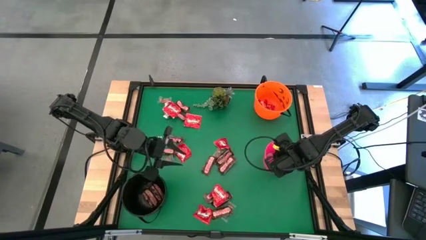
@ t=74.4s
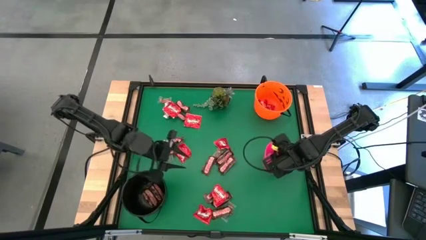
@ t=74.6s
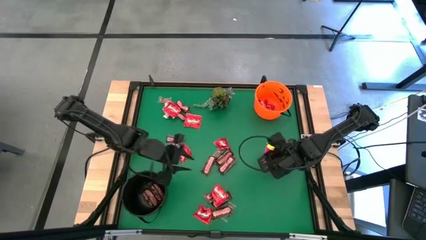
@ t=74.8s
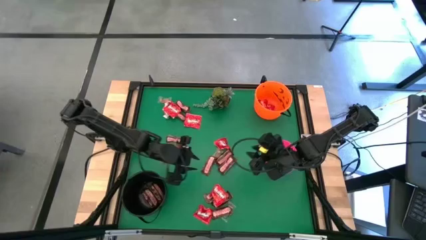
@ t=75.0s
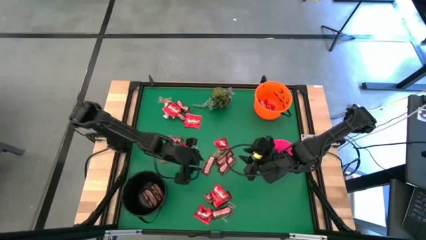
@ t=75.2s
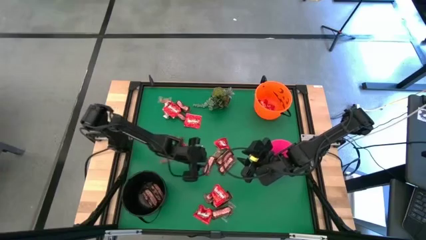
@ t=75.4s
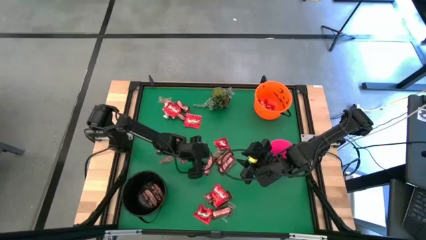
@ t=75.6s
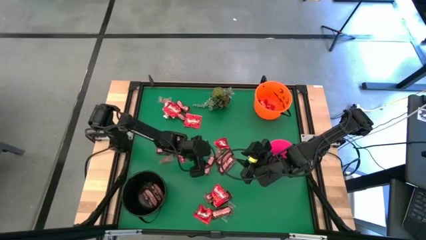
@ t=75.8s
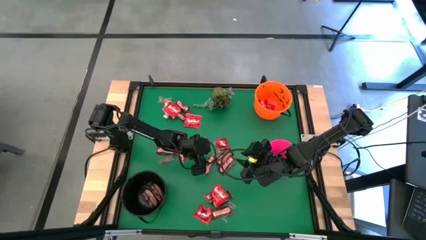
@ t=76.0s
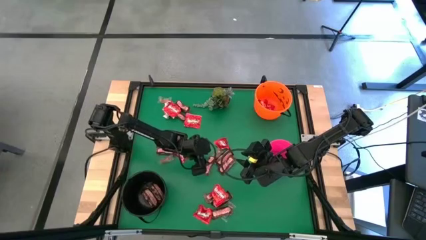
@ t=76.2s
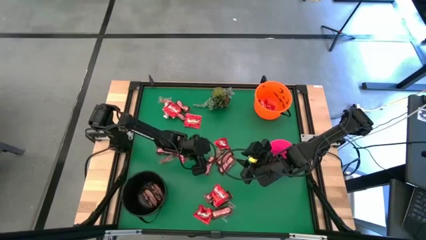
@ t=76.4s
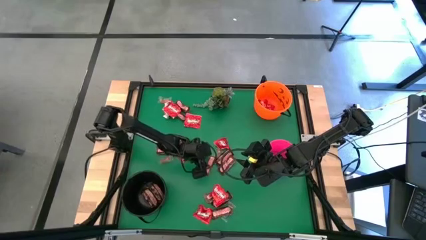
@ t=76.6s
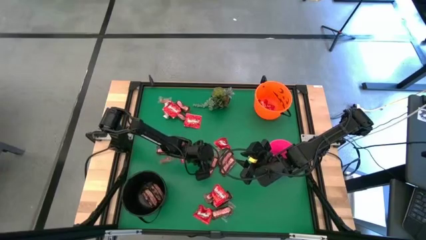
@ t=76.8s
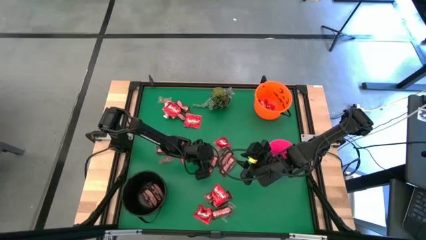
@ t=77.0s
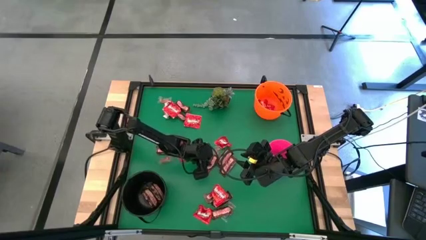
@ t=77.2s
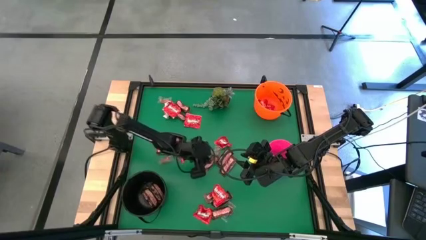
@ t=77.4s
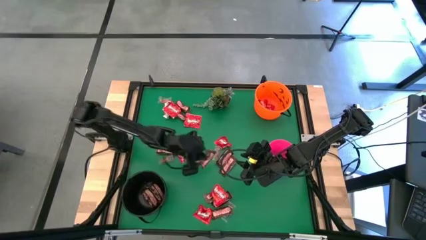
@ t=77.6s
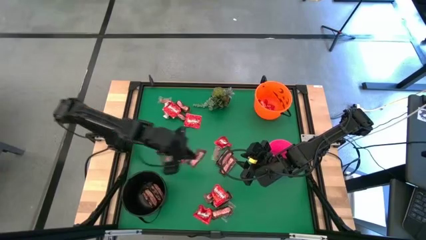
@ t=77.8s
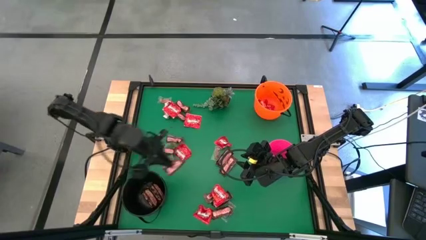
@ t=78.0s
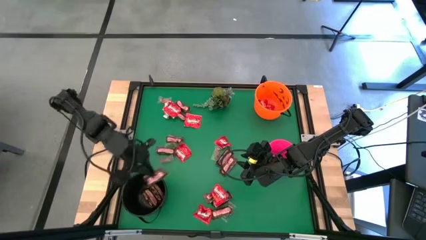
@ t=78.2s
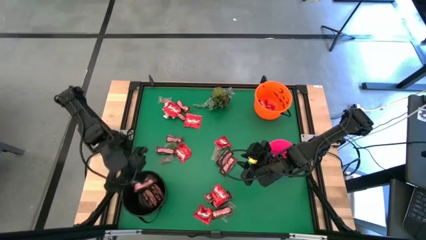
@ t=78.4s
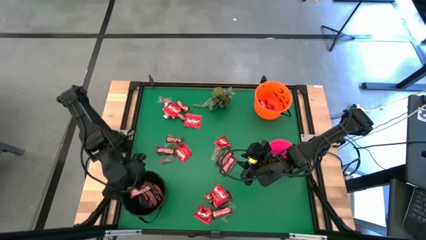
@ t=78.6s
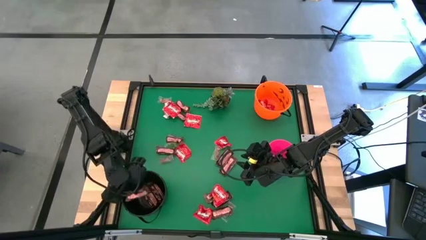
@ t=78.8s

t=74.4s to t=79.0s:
Task: Sort candy
Put the brown chocolate bar into the black bucket

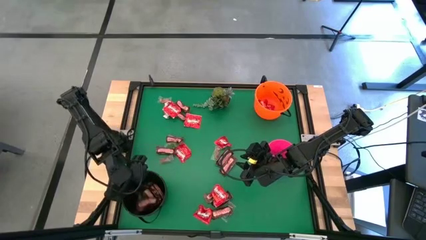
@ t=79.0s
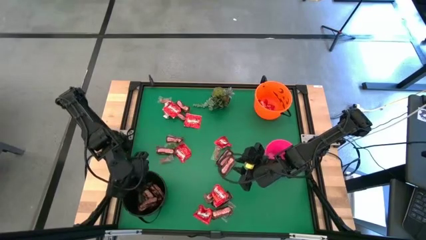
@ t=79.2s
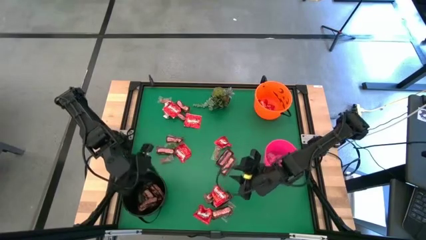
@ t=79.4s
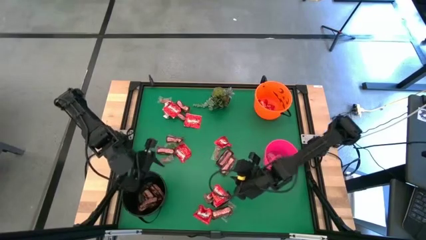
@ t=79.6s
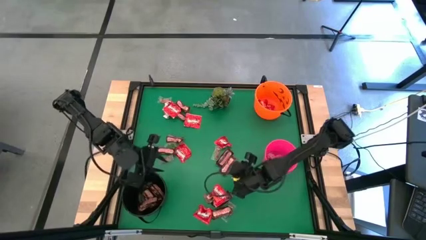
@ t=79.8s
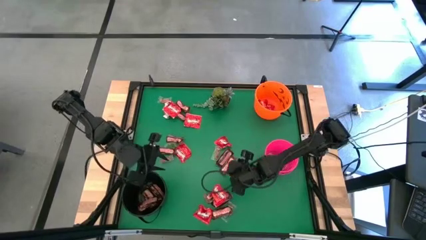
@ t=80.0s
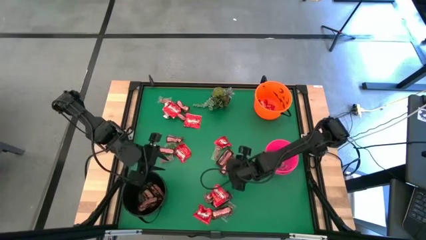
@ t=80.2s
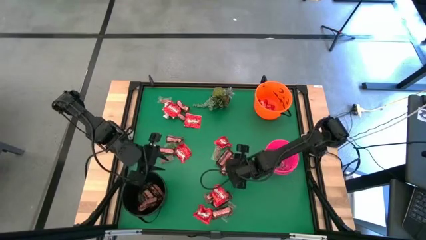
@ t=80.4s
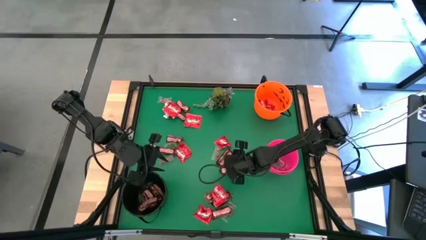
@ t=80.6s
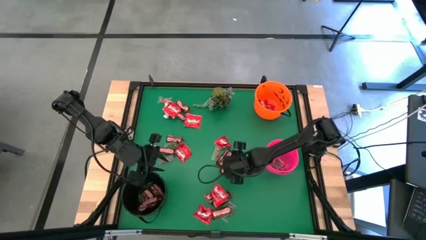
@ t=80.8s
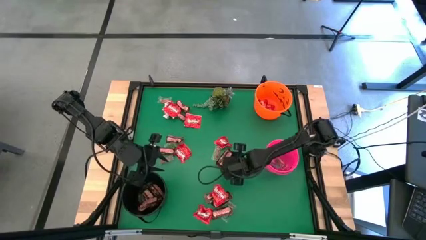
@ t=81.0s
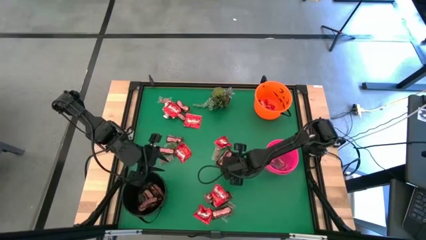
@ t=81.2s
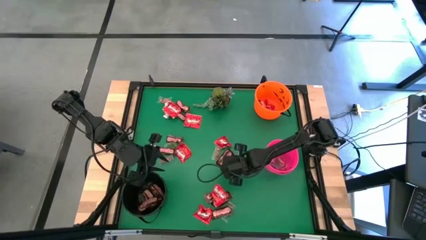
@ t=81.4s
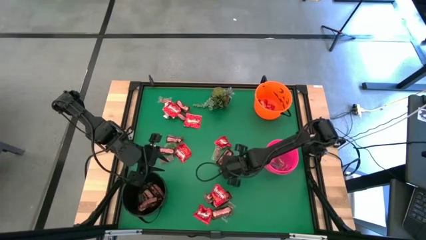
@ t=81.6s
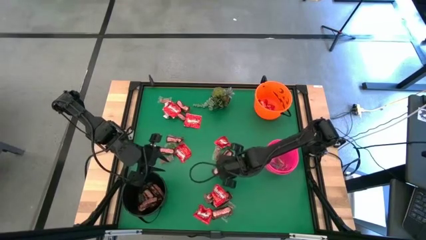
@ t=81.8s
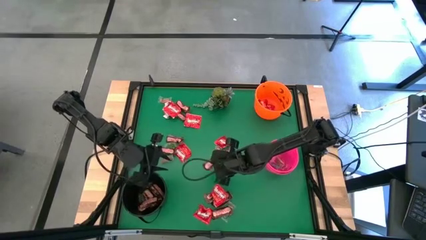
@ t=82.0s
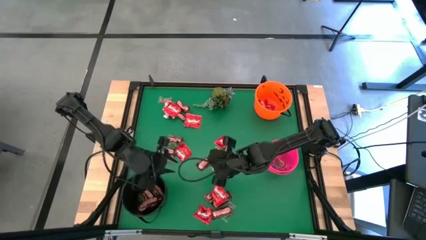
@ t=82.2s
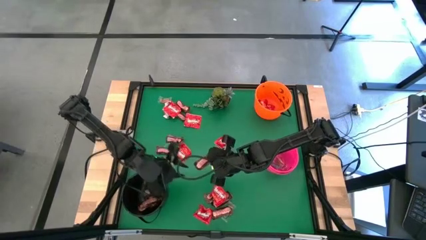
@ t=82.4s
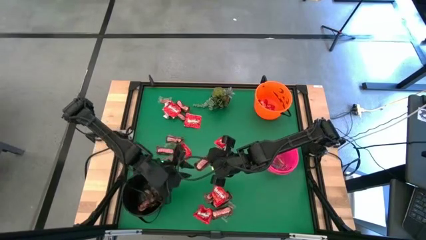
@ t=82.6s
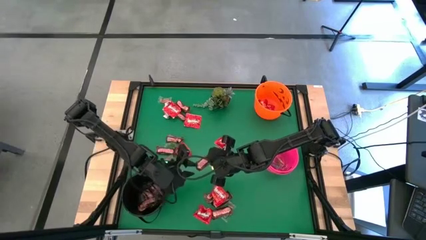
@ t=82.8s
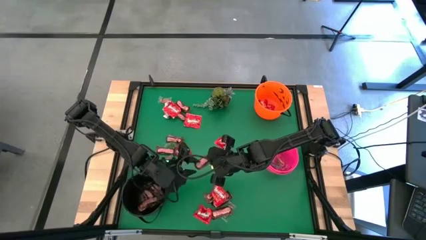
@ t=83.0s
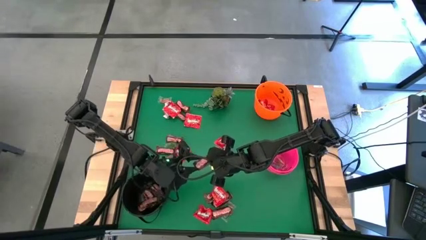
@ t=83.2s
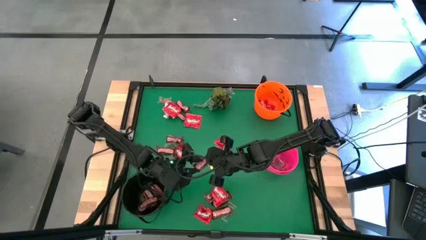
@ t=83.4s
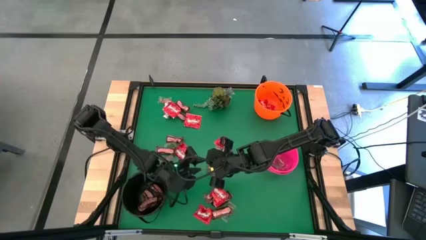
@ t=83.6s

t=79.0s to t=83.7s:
Put the brown chocolate bar into the black bucket

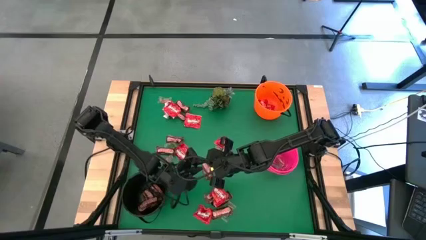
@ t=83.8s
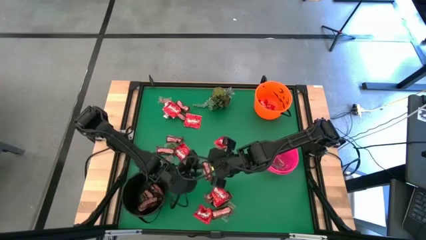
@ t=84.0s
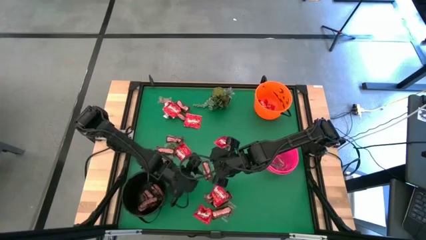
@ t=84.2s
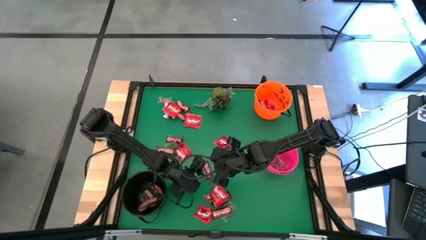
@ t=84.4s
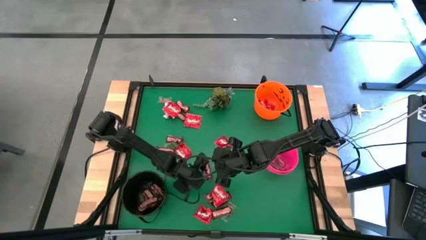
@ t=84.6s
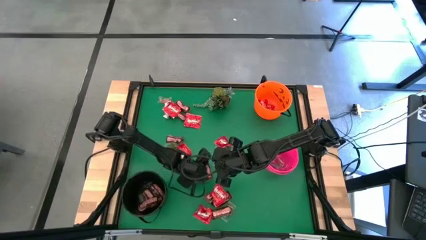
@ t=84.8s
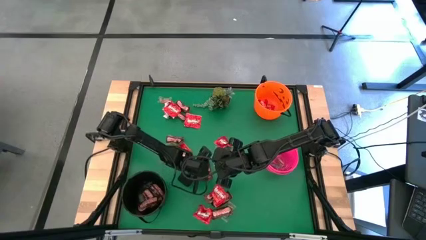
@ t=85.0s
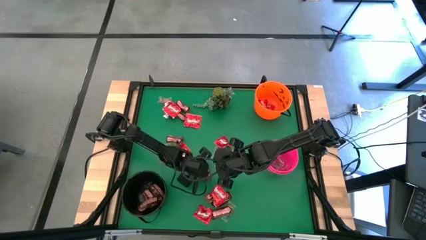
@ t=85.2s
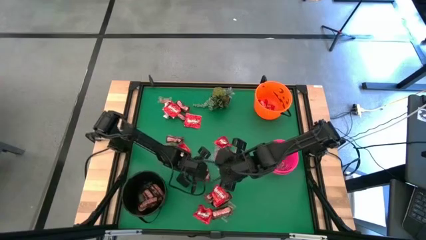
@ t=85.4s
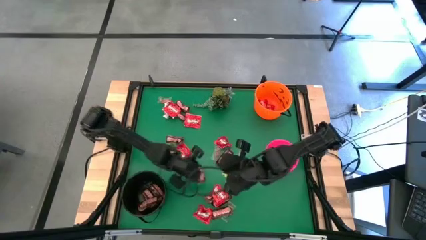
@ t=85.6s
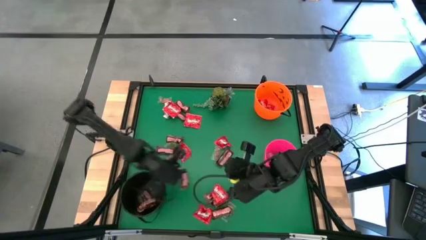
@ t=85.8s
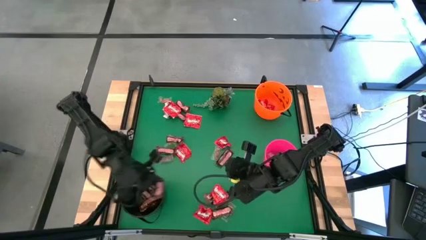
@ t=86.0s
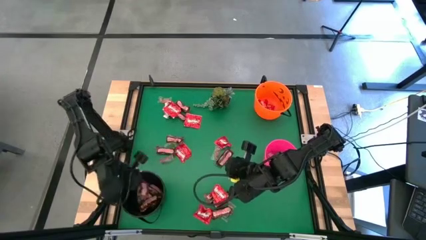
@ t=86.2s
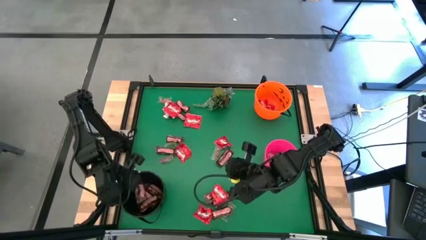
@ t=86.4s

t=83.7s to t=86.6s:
Put the brown chocolate bar into the black bucket

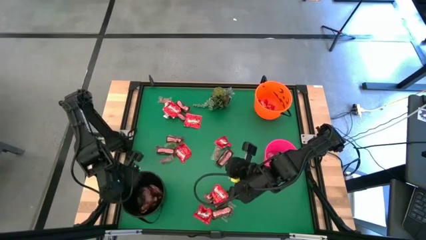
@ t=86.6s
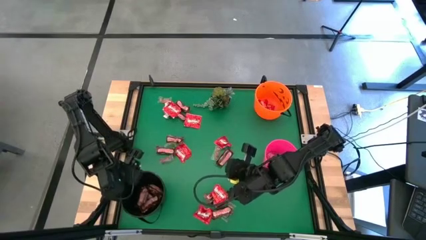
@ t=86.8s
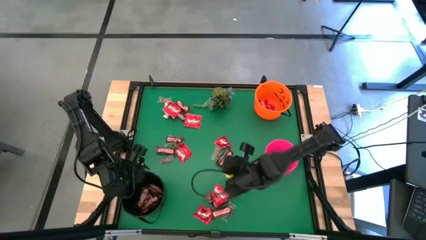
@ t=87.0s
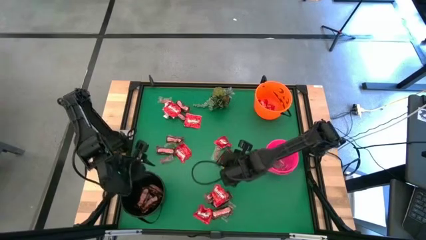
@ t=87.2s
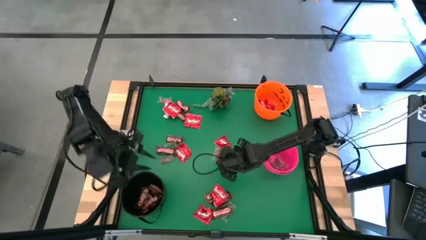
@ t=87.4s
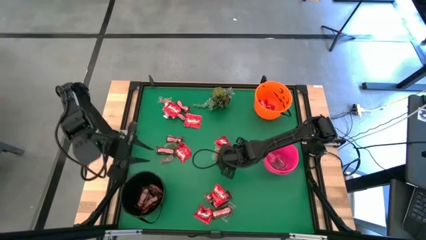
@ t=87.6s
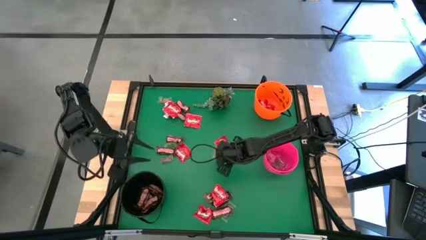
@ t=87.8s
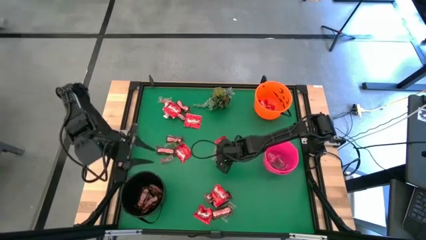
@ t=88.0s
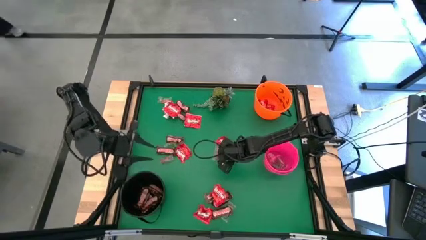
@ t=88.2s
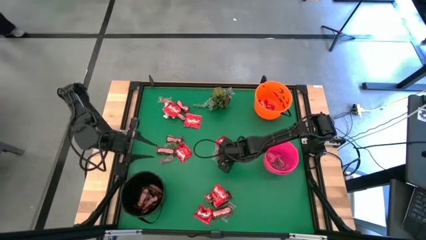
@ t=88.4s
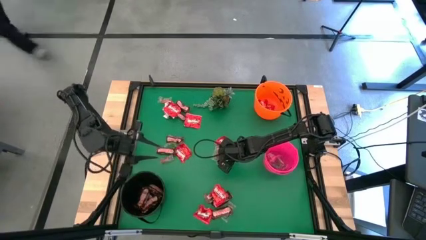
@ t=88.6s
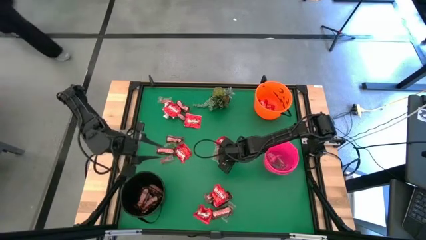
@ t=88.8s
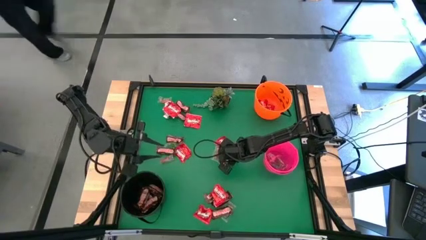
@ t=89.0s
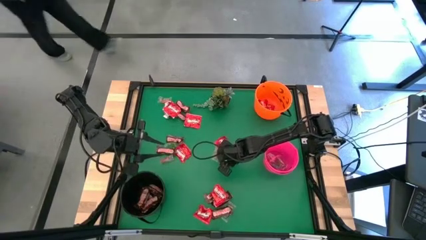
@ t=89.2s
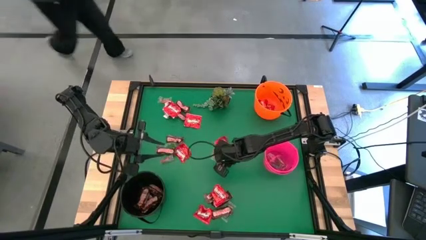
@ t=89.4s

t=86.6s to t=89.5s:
Put the brown chocolate bar into the black bucket

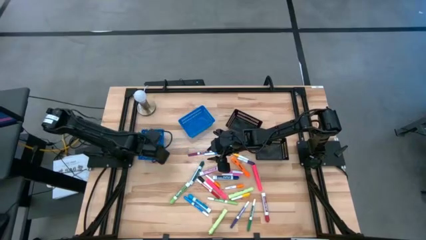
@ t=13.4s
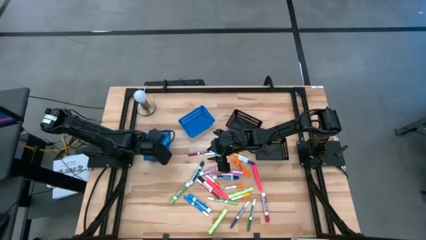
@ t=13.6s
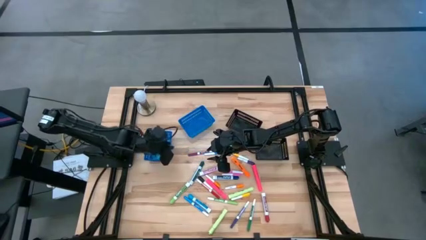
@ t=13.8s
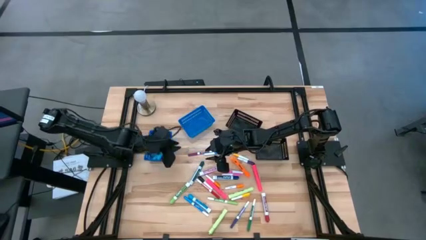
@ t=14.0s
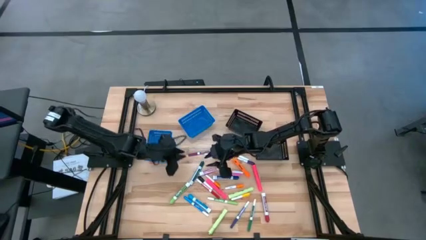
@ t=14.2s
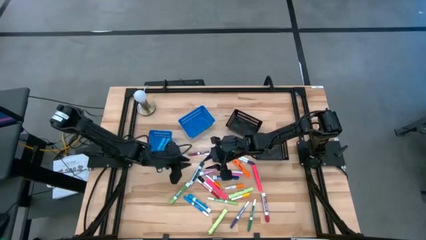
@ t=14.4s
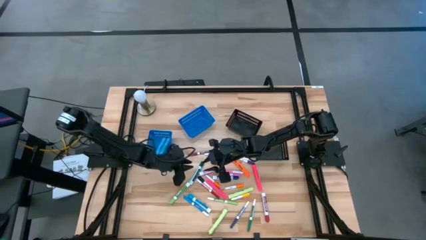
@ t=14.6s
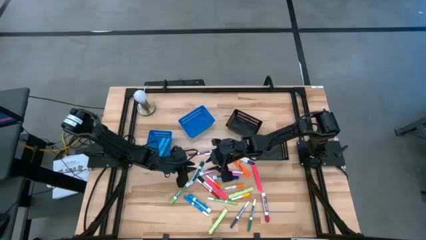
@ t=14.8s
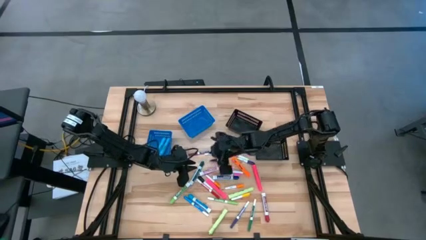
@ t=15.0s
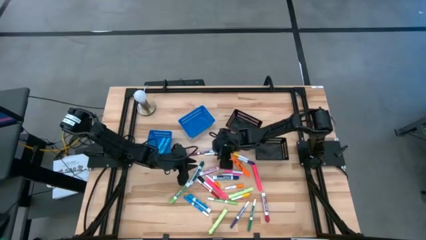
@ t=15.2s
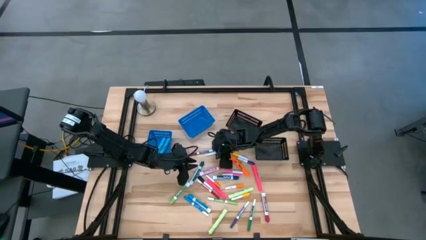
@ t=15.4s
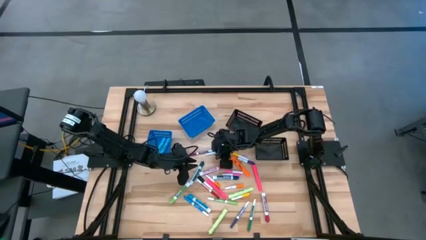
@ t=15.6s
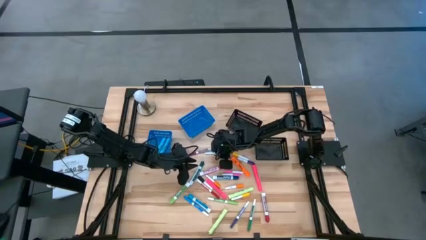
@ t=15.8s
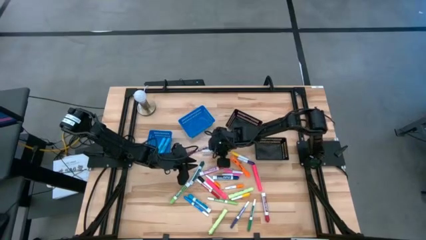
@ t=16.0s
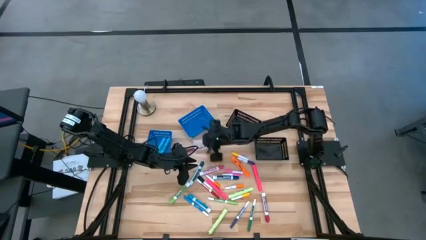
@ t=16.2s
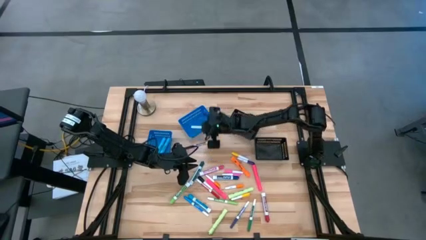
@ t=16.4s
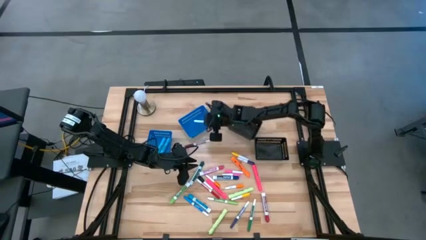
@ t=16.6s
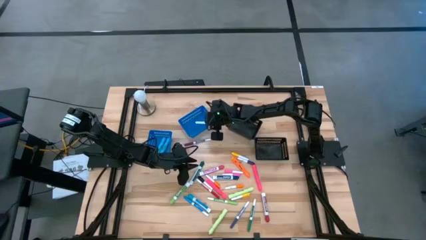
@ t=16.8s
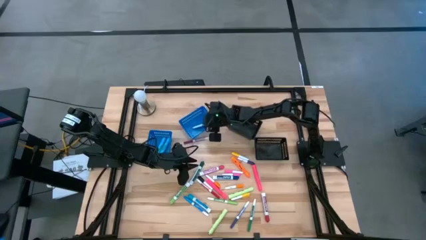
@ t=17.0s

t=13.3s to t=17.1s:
Task: Pick & Place Markers
Put the light blue highlighter pen into the bottom black bin
